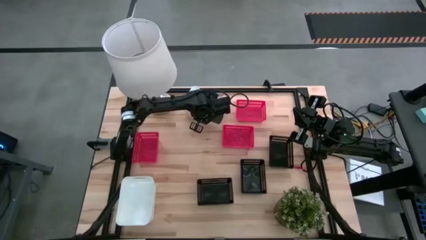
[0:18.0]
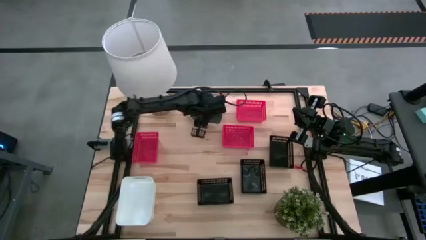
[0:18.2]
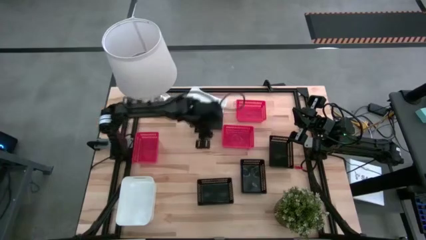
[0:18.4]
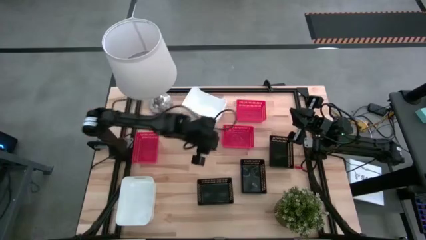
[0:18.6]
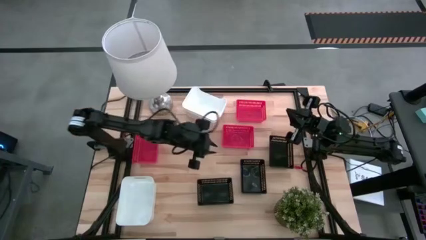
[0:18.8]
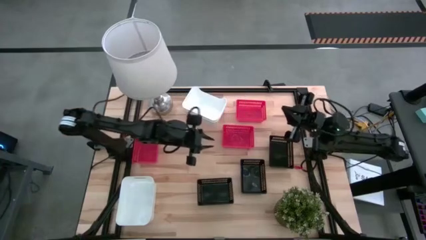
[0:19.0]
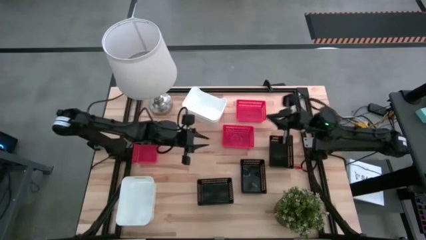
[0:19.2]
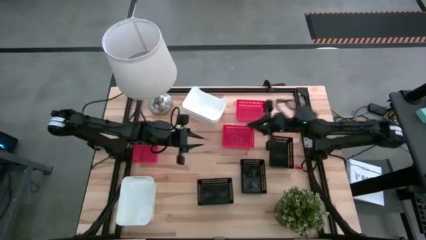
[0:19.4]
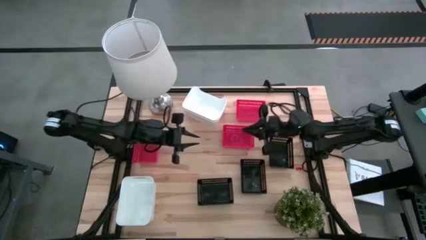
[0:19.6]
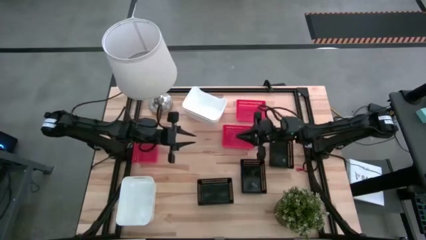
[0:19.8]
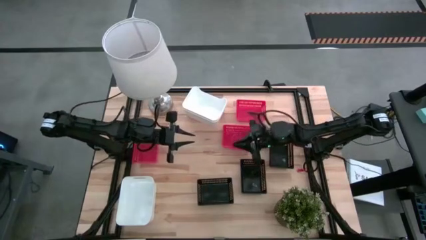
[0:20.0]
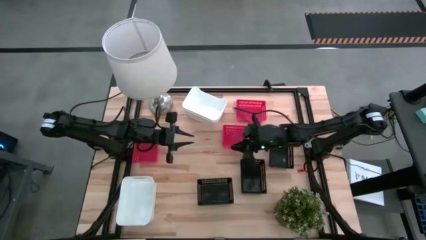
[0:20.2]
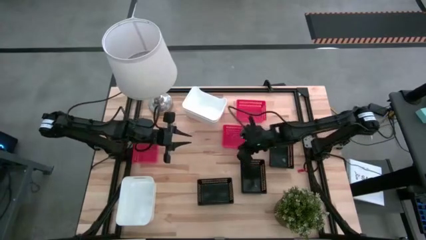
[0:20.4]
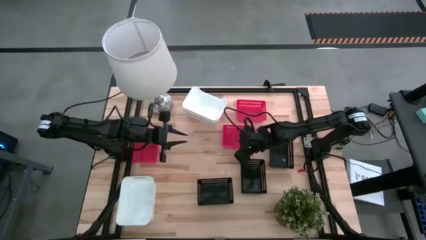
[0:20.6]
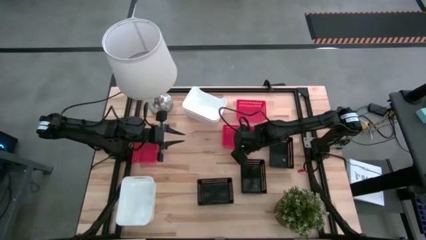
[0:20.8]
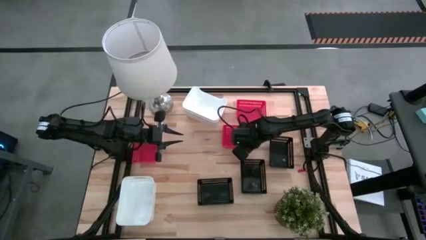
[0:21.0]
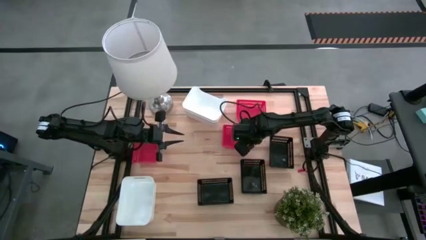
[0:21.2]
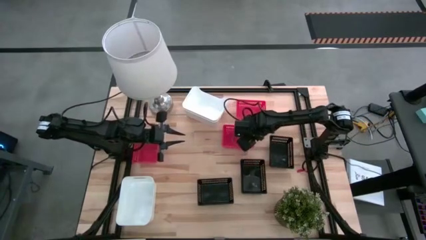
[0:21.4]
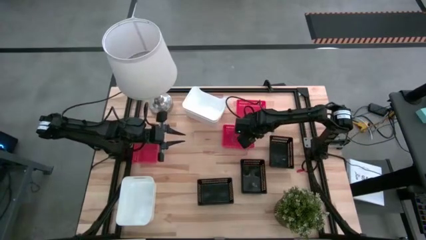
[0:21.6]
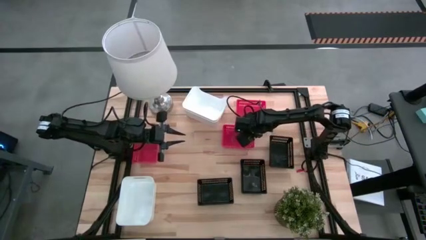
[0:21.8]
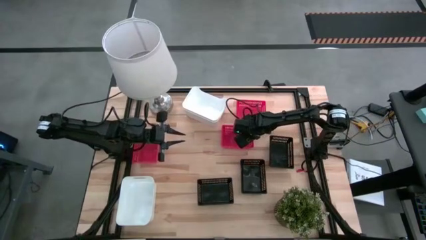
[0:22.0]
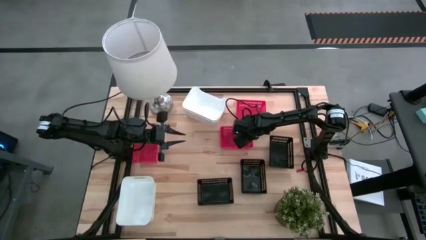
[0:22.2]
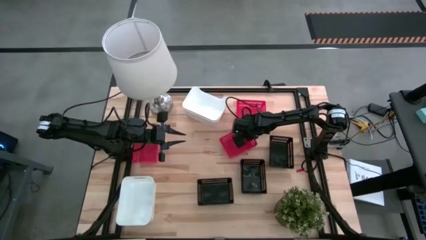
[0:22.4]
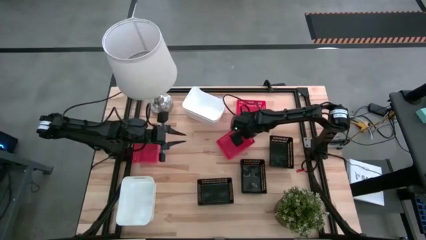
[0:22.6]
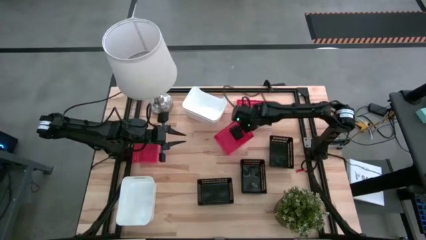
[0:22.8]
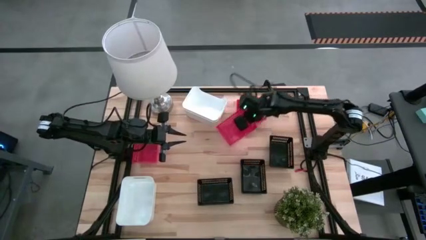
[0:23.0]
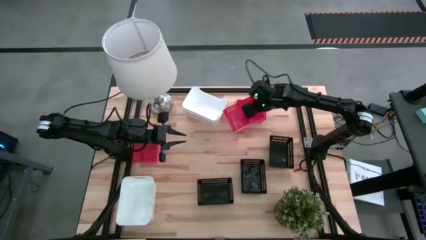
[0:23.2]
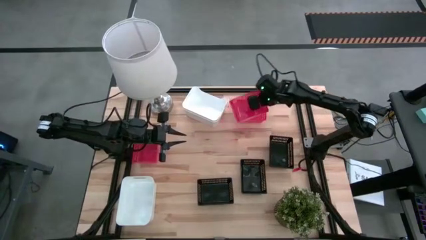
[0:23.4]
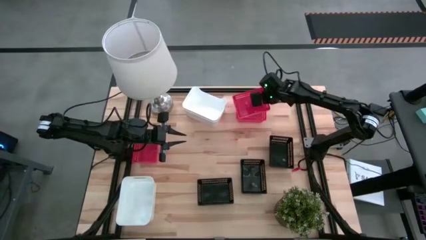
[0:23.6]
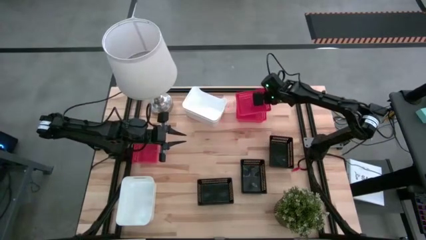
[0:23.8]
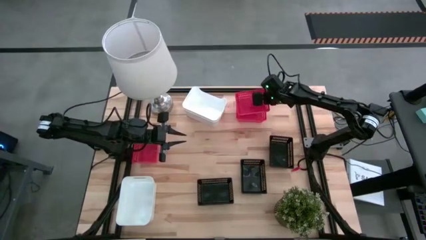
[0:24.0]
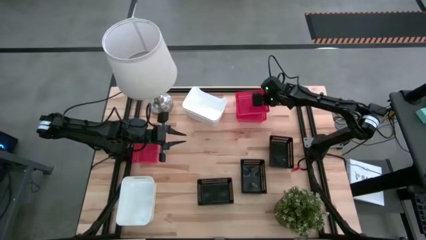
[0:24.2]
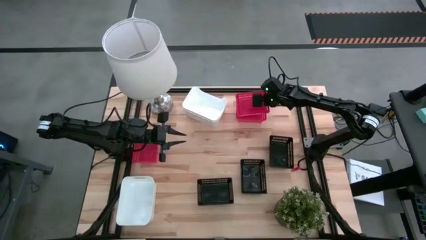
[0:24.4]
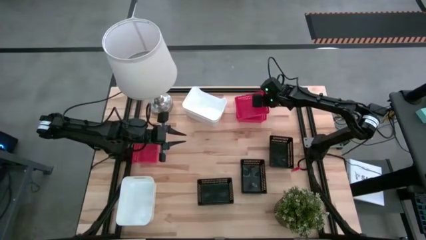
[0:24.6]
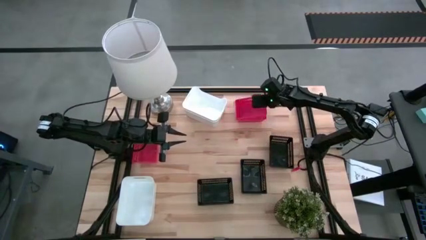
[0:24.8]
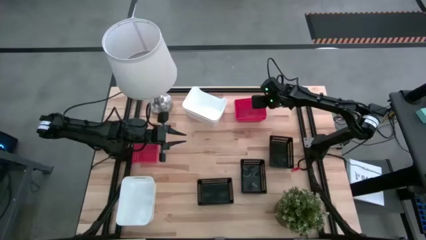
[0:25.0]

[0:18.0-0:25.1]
Stack the bottom right red bin on top of the top red bin

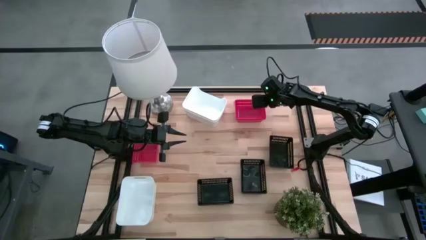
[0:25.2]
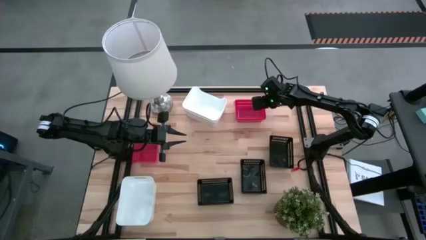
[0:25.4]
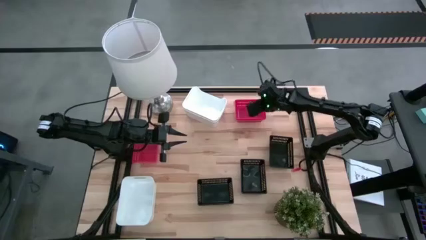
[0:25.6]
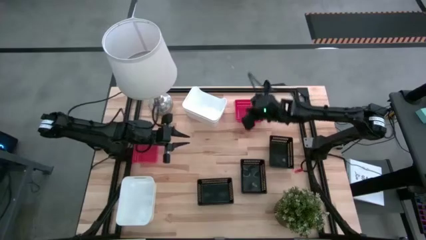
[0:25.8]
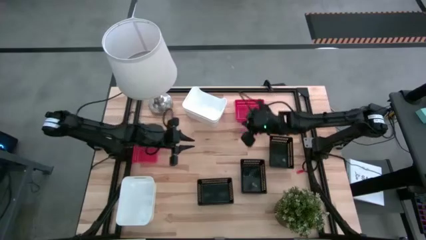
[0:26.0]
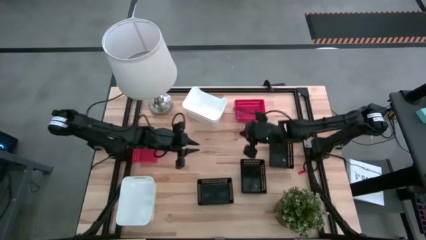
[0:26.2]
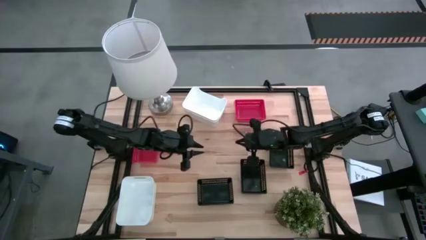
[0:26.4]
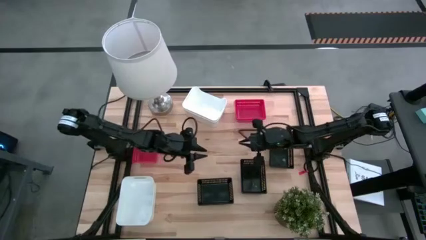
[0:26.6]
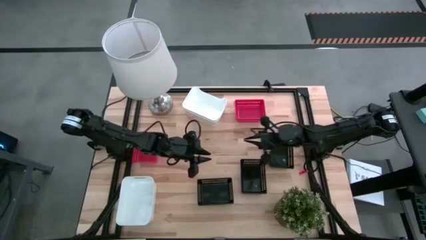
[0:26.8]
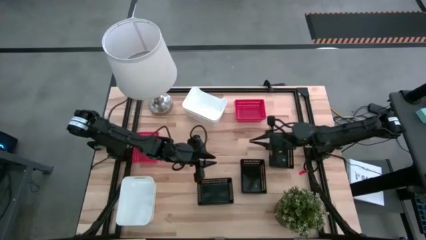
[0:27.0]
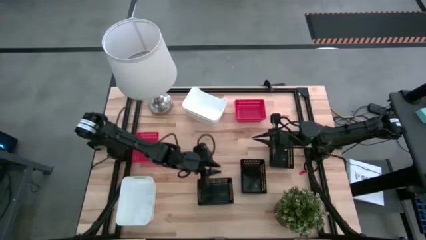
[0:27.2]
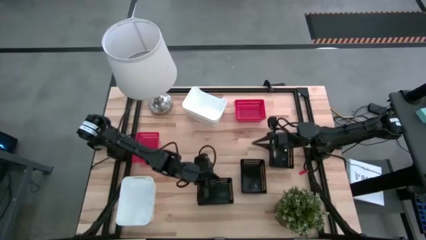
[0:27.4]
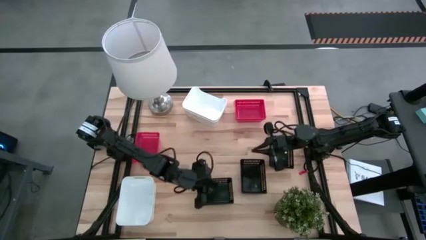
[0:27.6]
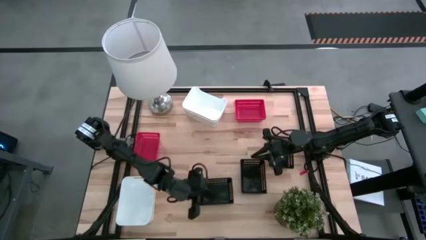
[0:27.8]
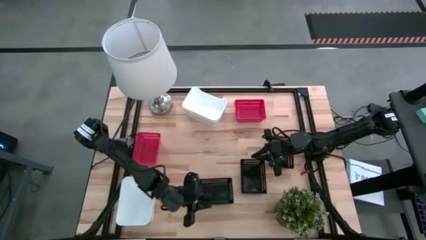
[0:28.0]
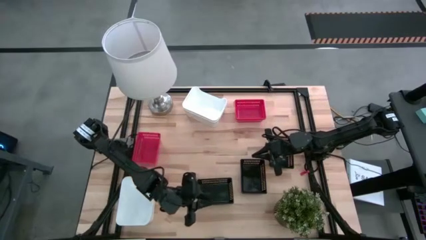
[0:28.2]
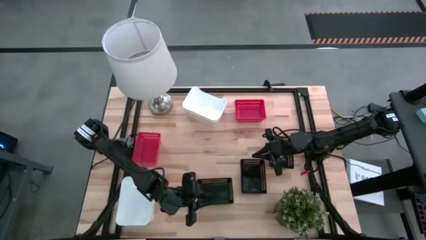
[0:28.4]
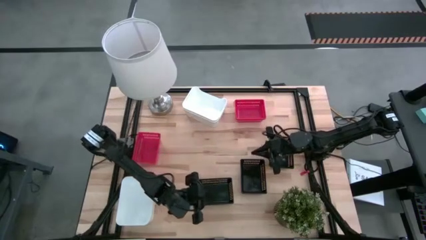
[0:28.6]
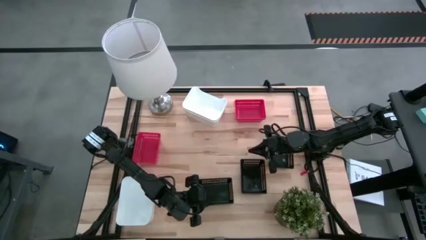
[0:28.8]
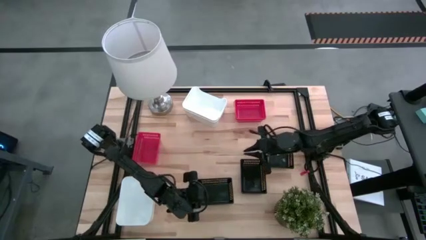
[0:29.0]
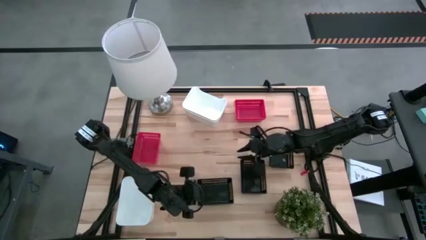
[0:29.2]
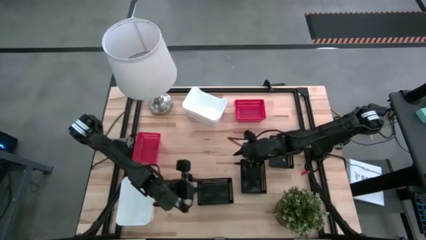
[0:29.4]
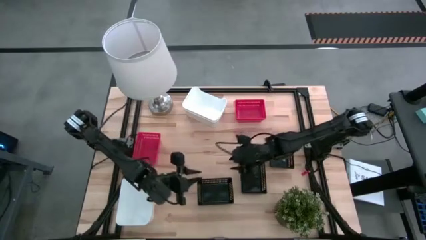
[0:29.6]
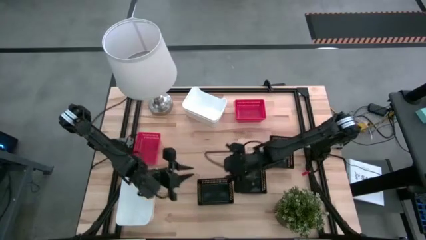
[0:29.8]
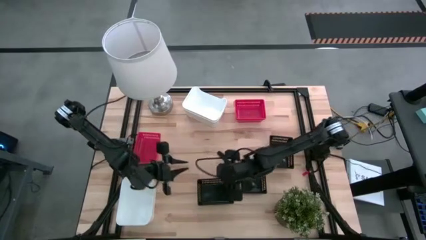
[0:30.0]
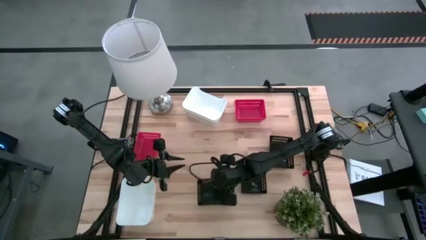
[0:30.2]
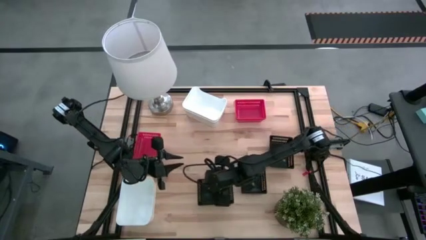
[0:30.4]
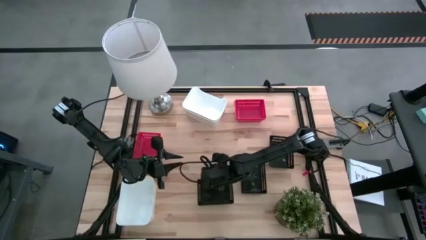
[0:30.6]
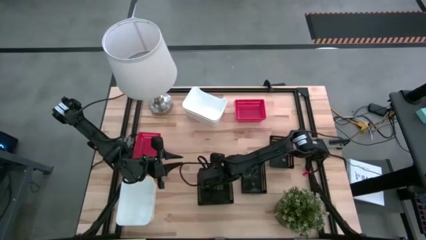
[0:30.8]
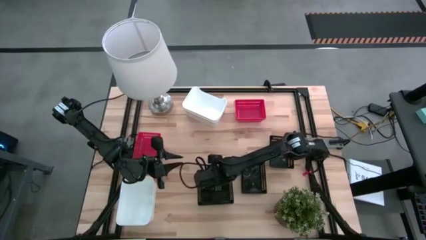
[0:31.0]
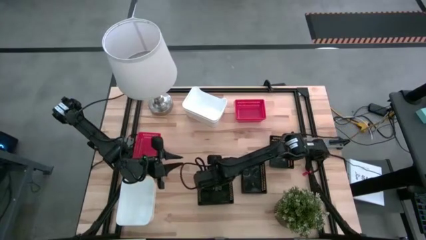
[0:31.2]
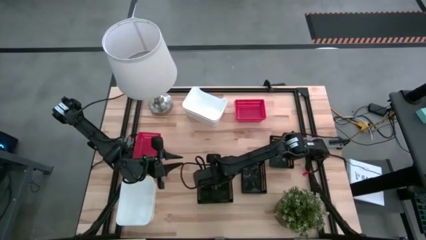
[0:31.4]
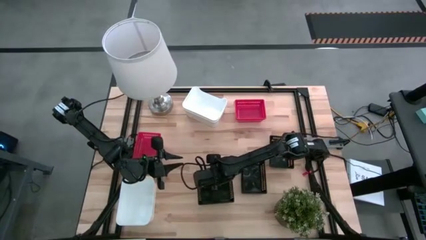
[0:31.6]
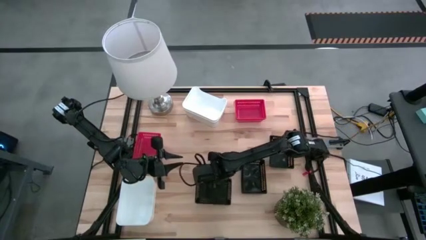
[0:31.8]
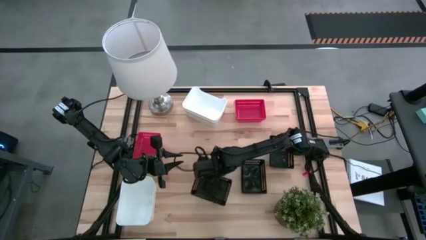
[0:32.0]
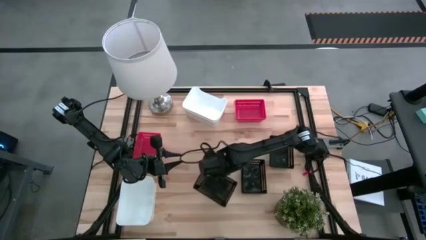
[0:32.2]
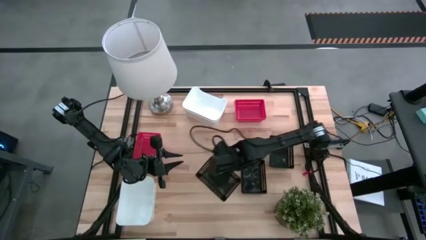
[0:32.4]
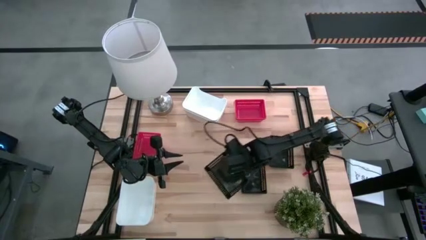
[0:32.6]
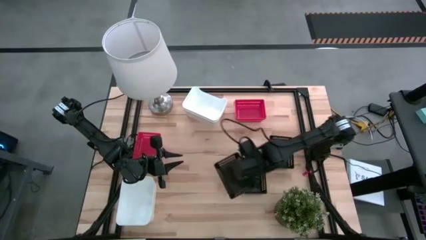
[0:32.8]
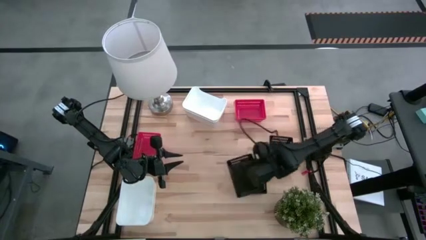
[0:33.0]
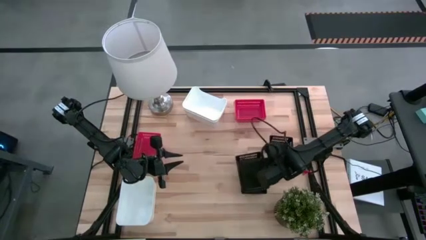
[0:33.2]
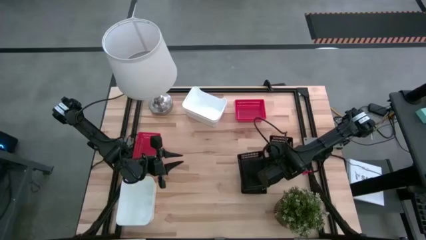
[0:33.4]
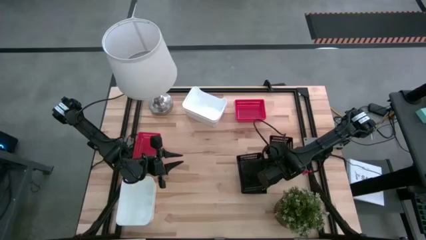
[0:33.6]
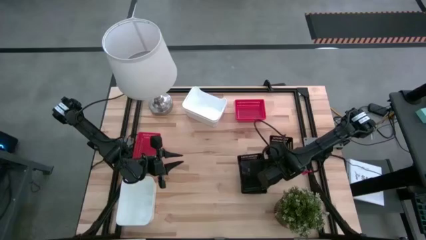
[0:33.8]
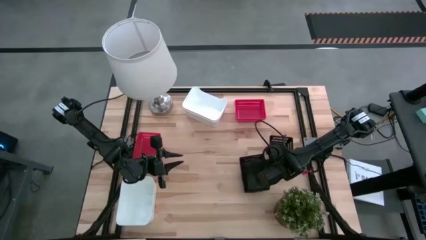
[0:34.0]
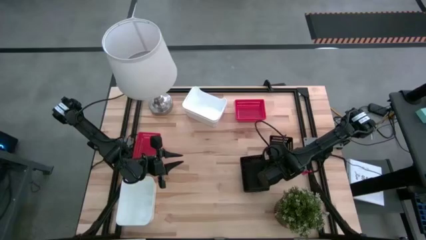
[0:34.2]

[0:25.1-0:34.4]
Stack the left black bin on top of the middle black bin
